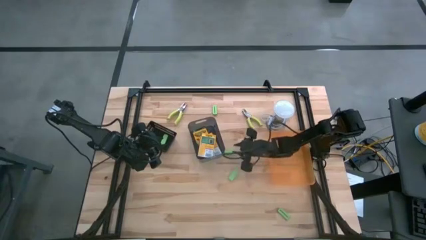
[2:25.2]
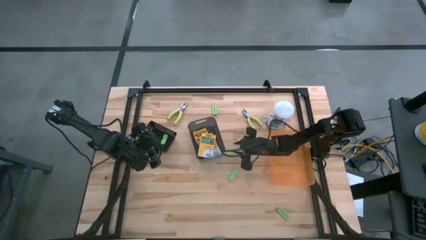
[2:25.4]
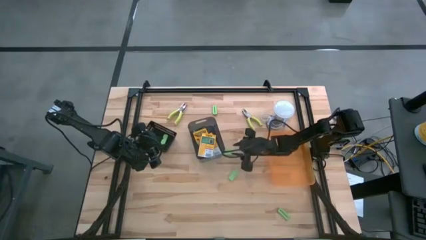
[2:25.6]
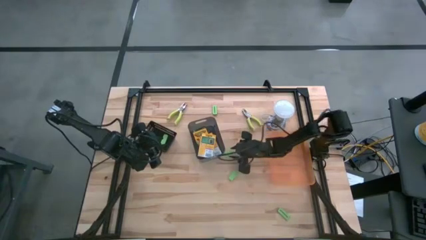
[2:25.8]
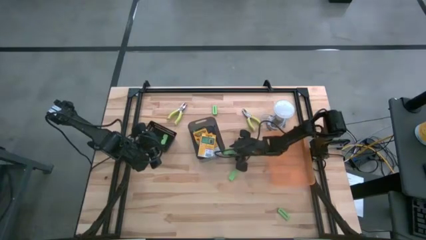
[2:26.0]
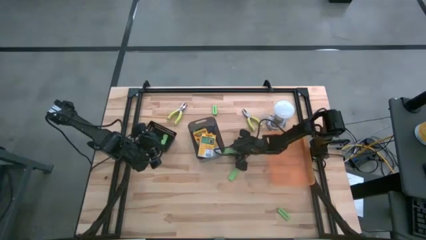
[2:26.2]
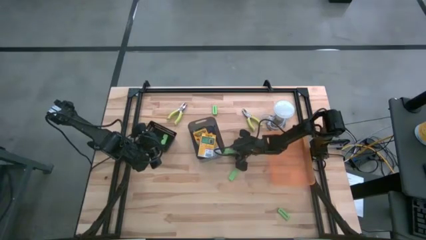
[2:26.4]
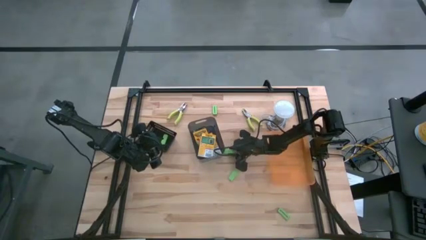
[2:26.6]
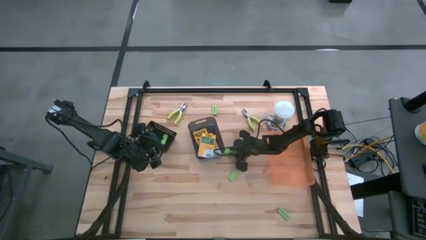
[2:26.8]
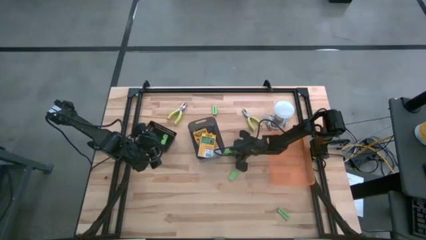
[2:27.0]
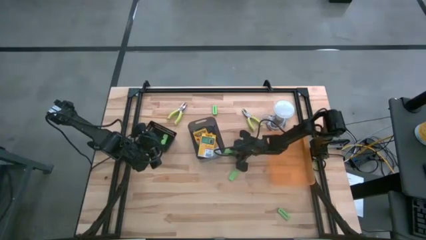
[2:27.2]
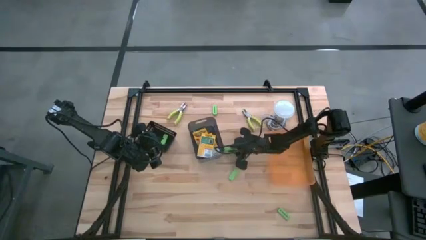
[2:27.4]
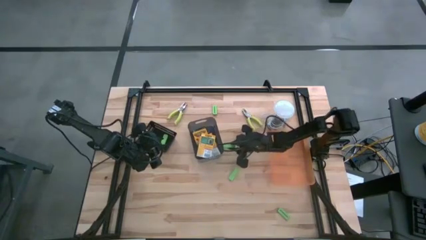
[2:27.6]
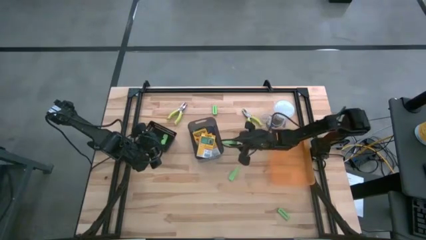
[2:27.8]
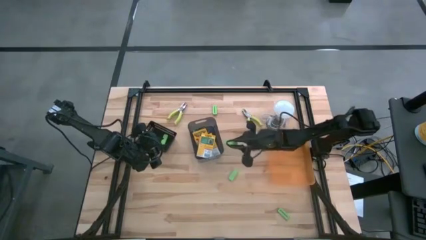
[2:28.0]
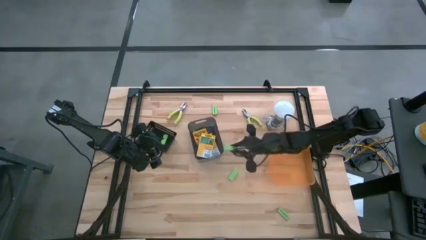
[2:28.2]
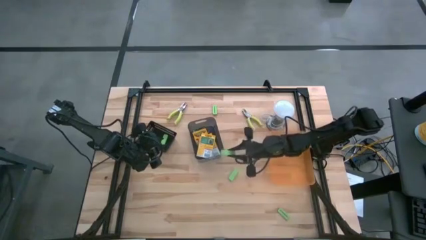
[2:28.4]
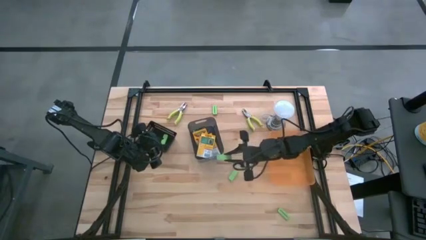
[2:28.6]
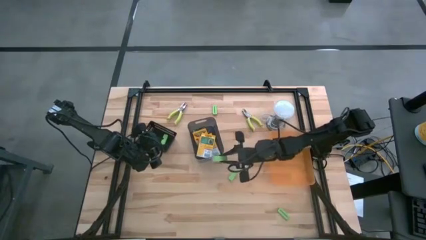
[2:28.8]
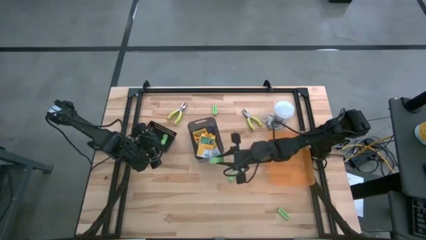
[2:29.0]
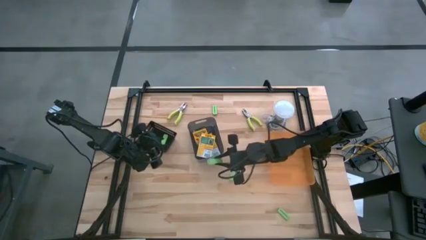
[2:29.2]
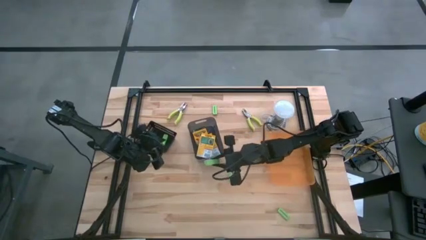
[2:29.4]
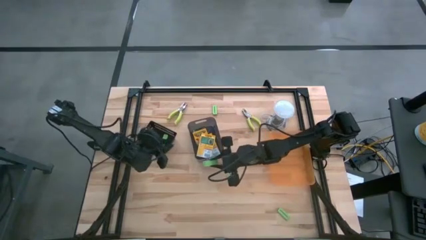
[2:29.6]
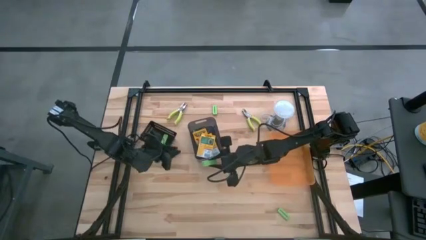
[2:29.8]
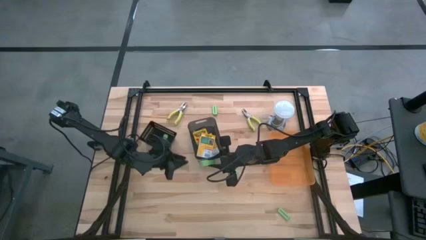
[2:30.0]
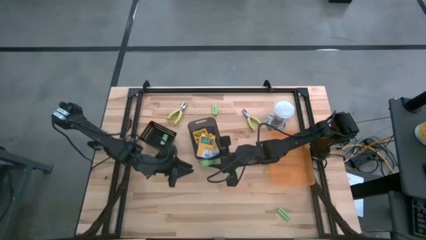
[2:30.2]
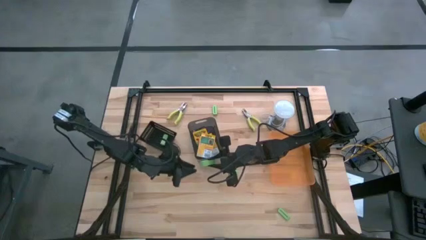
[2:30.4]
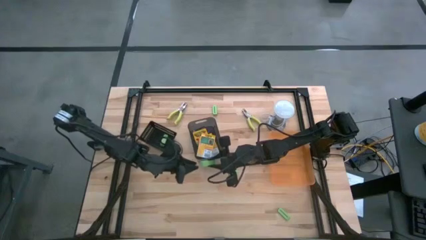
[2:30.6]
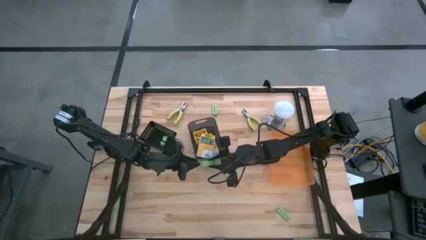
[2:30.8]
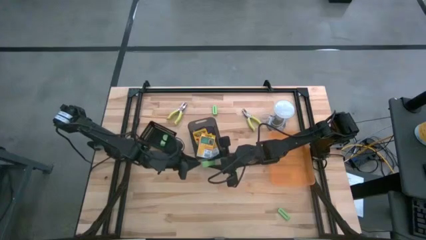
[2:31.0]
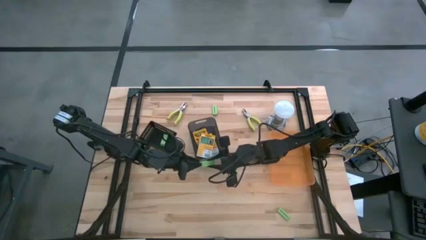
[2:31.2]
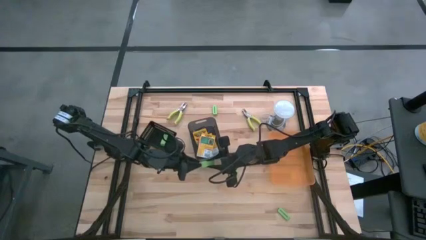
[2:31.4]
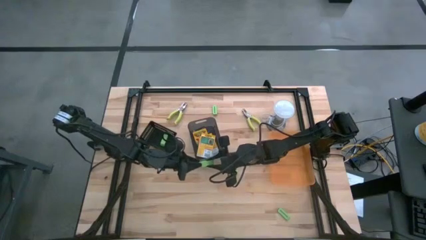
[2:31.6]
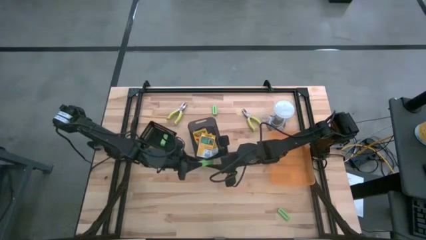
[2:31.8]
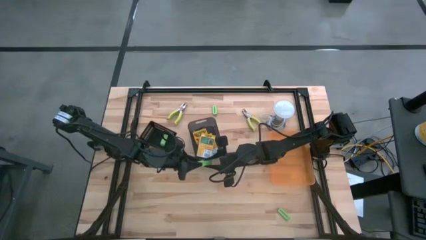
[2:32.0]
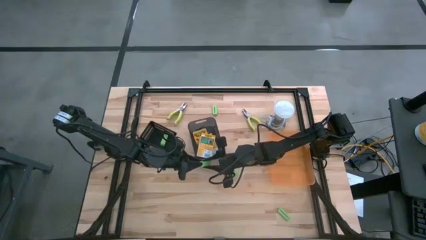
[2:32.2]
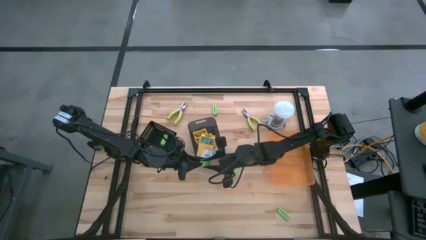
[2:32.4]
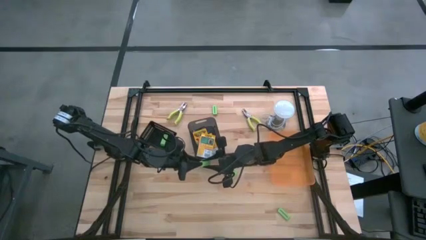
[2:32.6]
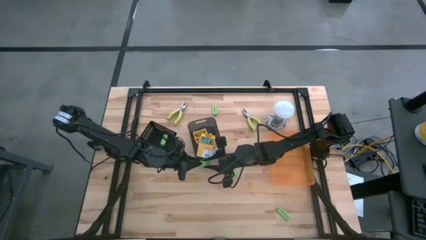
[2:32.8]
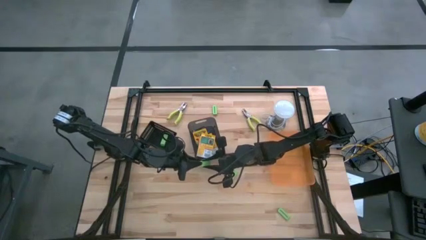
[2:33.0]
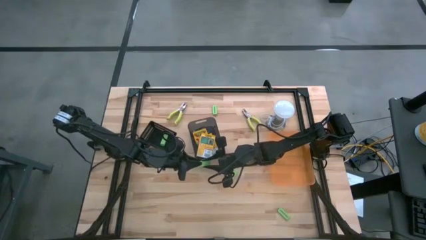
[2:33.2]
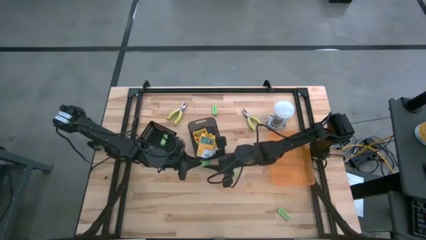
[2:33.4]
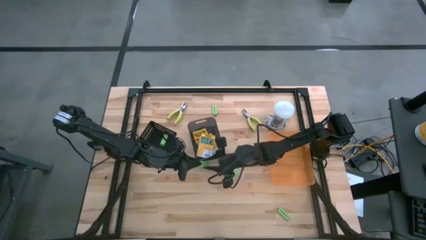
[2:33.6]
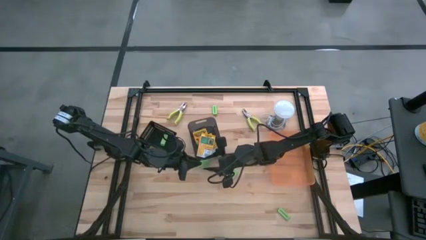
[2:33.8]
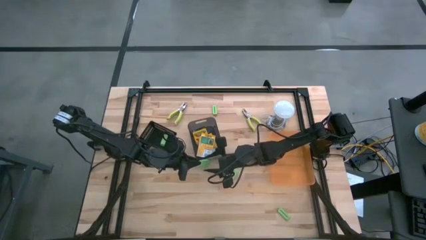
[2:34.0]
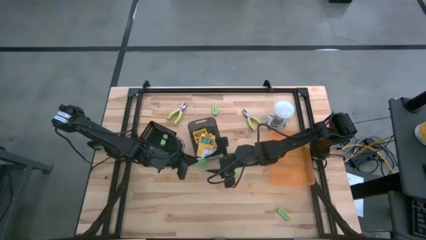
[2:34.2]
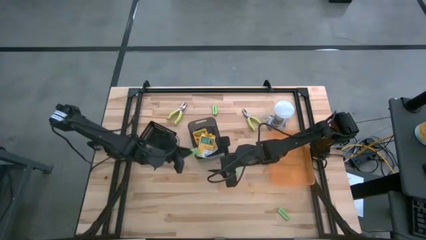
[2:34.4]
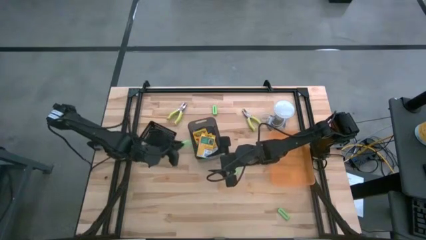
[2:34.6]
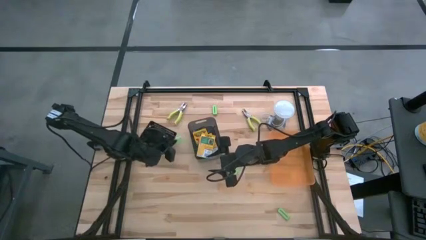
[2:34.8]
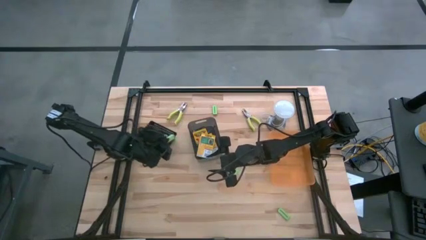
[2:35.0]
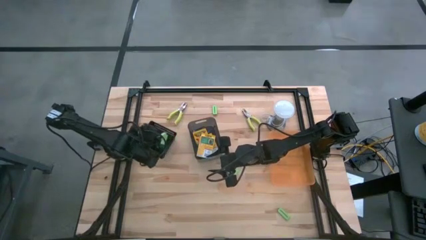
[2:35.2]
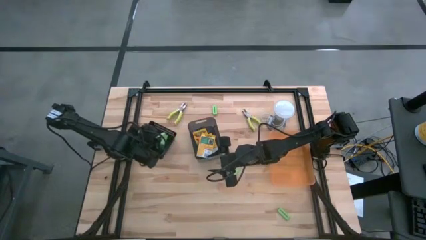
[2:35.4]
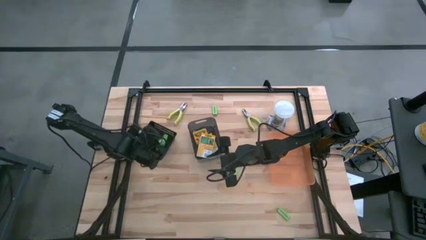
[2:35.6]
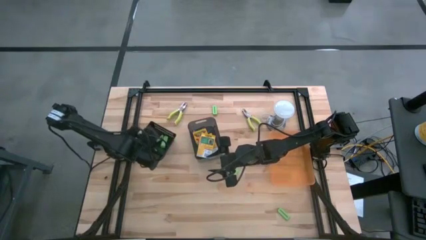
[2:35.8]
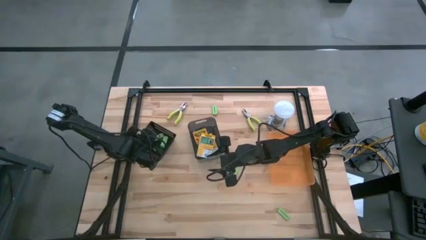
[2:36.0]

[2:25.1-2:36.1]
Task: Pick & Place School Supplies
Put the light green eraser into the black bin

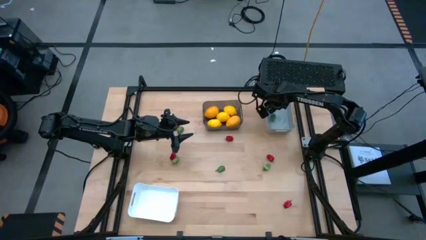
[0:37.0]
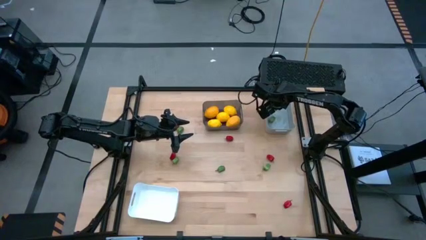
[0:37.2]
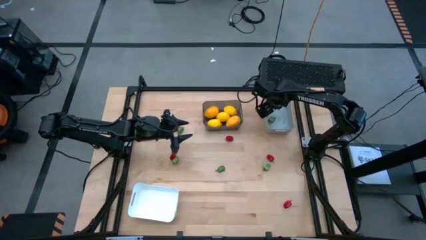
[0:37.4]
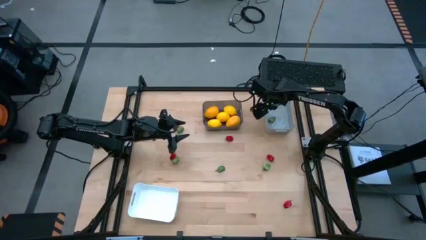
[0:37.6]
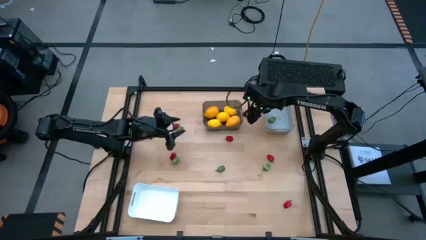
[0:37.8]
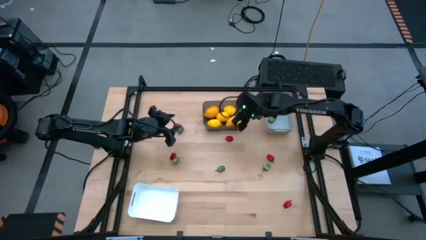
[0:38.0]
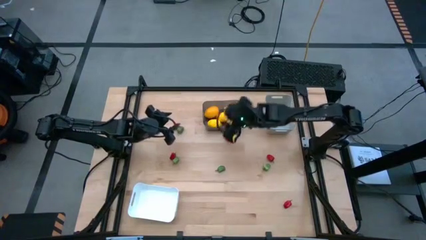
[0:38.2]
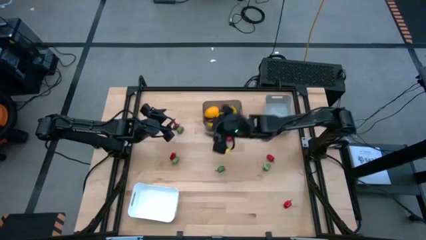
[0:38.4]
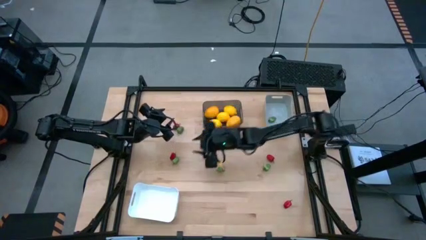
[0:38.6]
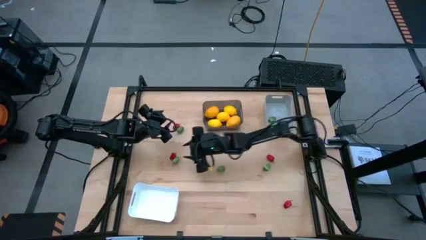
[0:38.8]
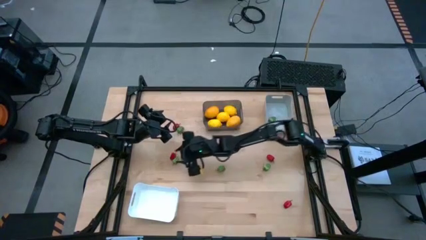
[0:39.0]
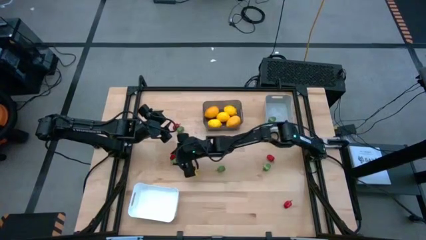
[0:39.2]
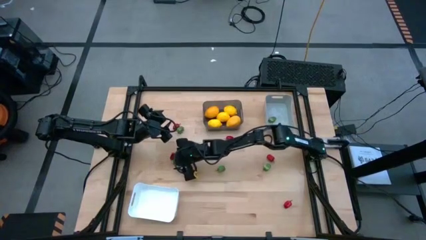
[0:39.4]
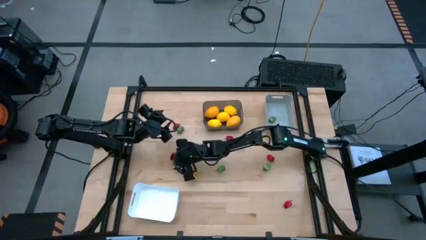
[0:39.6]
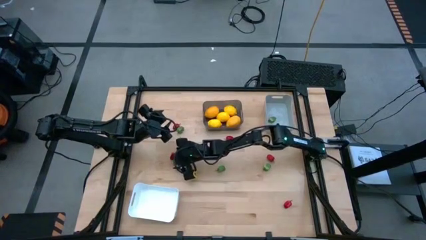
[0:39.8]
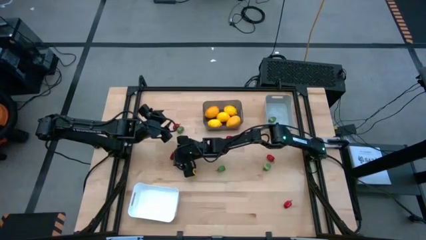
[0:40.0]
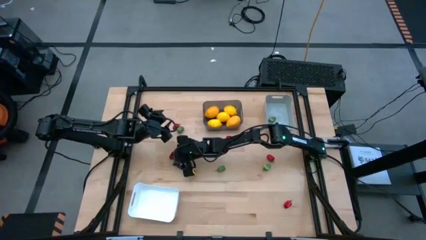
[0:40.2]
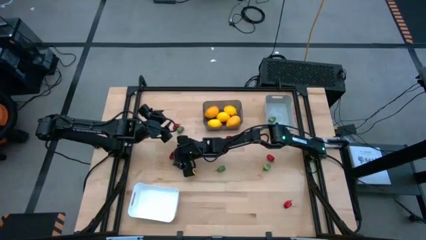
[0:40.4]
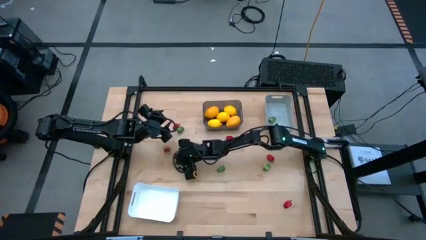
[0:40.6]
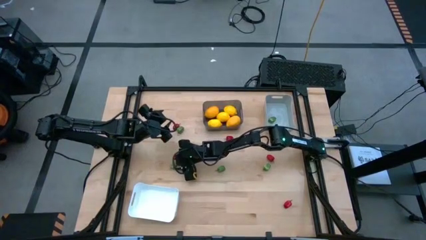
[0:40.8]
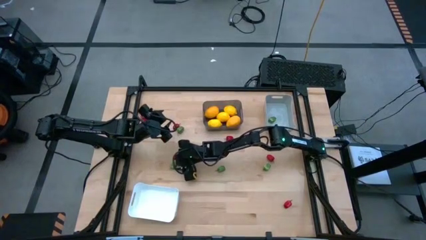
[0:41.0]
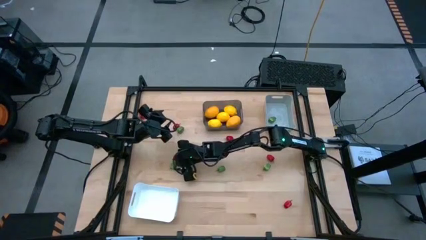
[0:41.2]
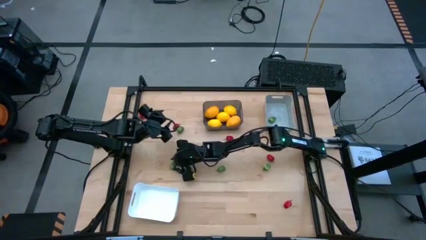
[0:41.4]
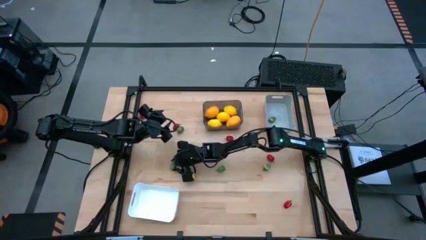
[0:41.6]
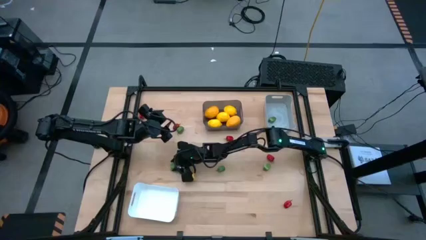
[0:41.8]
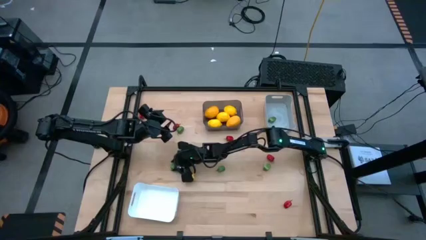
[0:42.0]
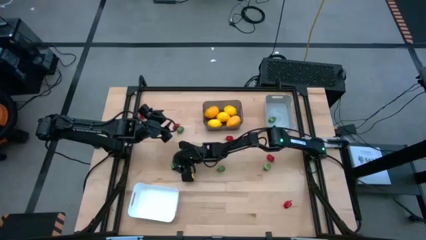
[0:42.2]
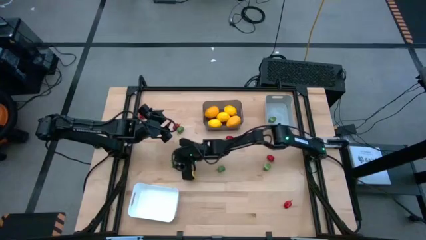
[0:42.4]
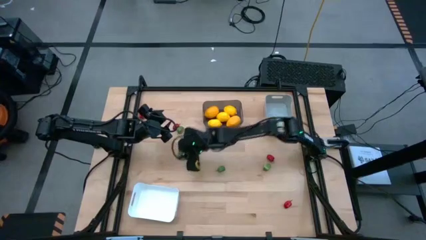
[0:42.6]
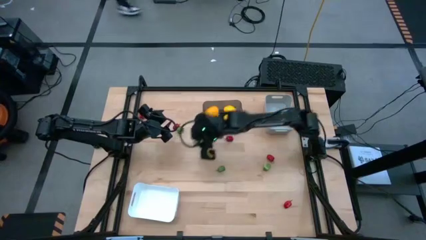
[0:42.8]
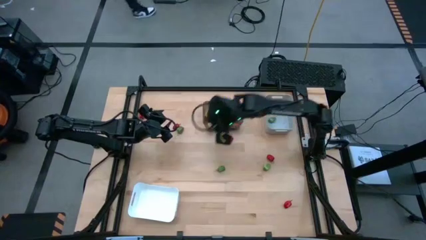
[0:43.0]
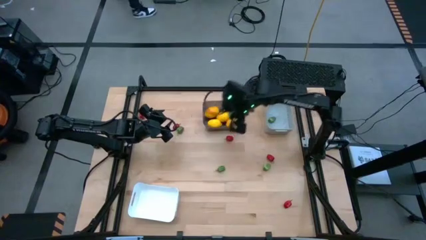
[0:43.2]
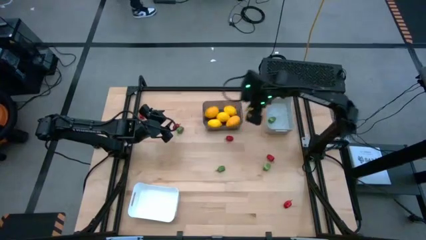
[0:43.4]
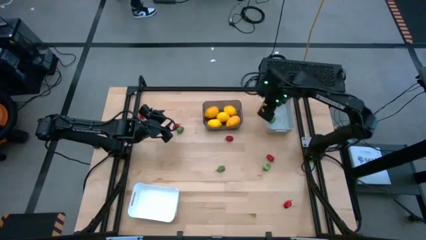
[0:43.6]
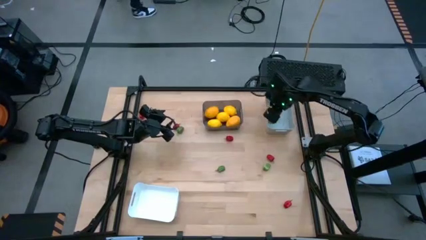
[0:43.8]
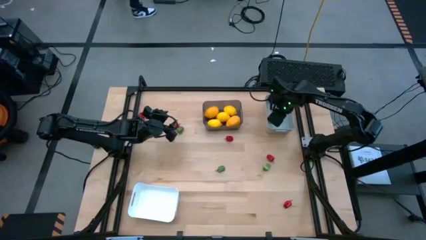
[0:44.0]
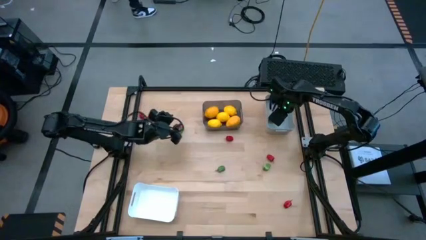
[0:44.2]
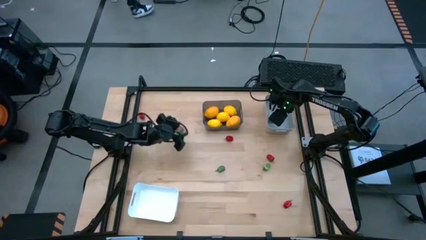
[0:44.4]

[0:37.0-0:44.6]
Task: Sort produce into baskets
Put the green pepper into the gray bin
